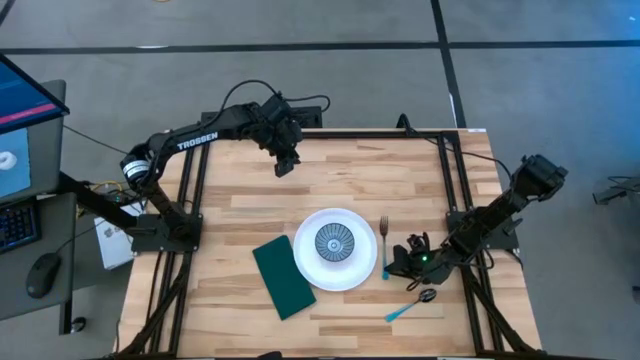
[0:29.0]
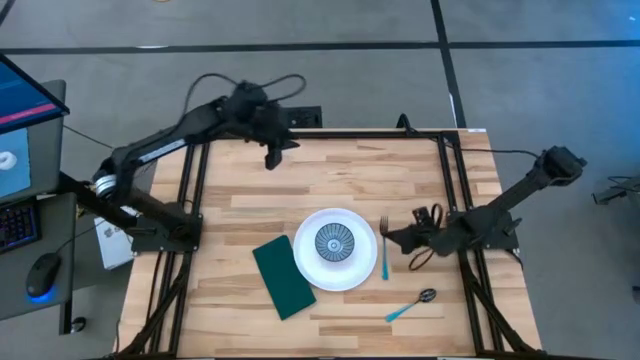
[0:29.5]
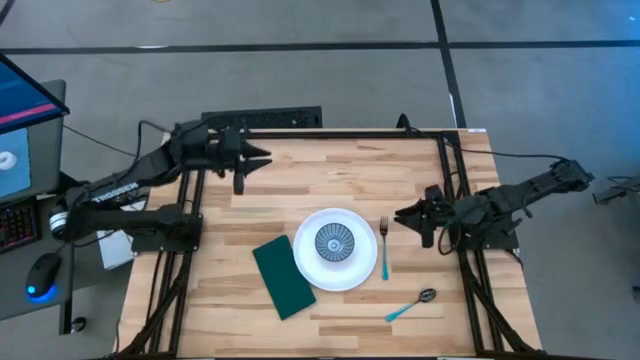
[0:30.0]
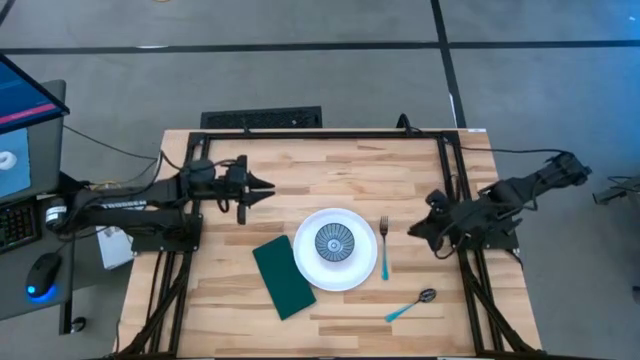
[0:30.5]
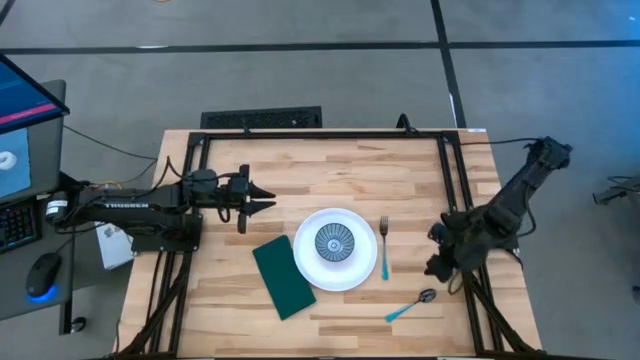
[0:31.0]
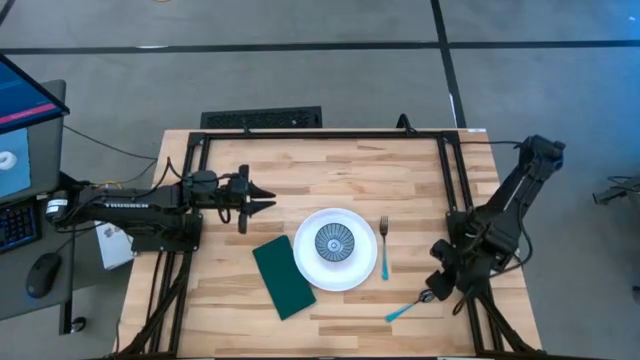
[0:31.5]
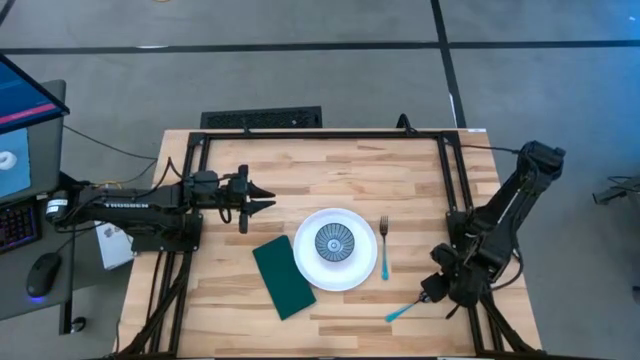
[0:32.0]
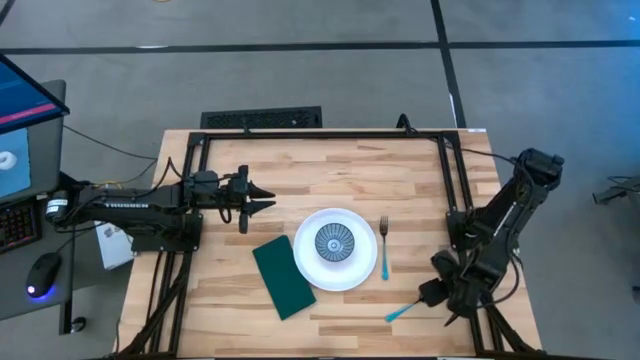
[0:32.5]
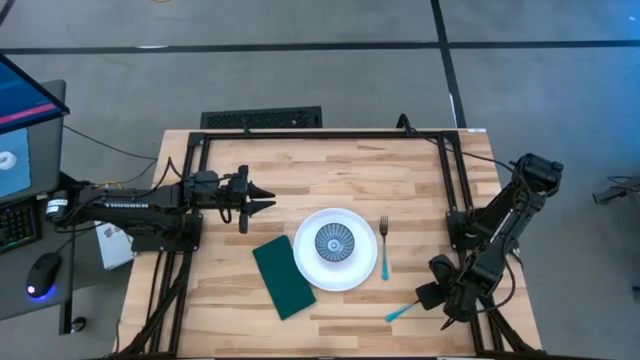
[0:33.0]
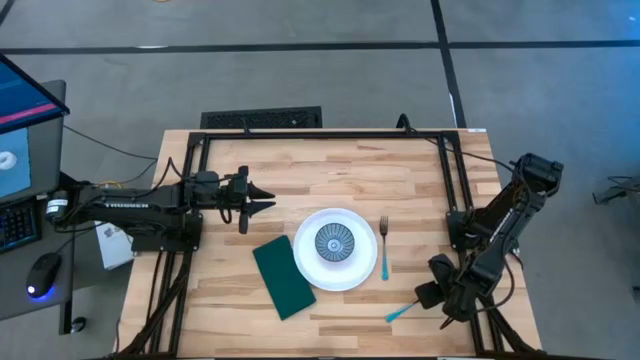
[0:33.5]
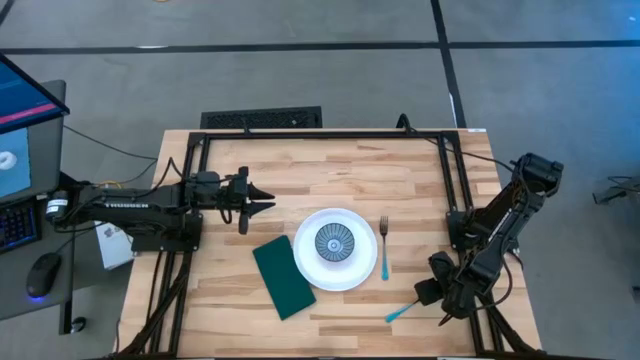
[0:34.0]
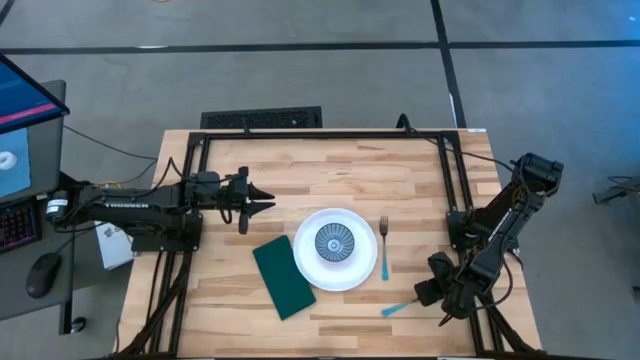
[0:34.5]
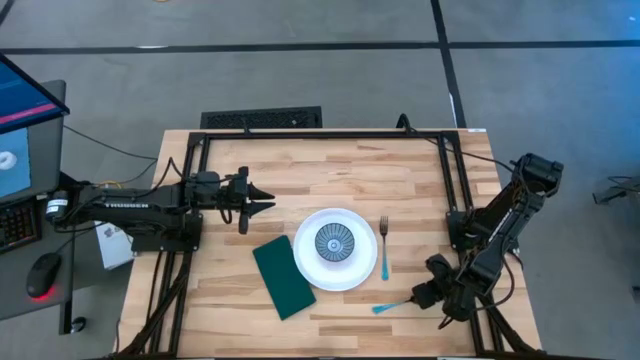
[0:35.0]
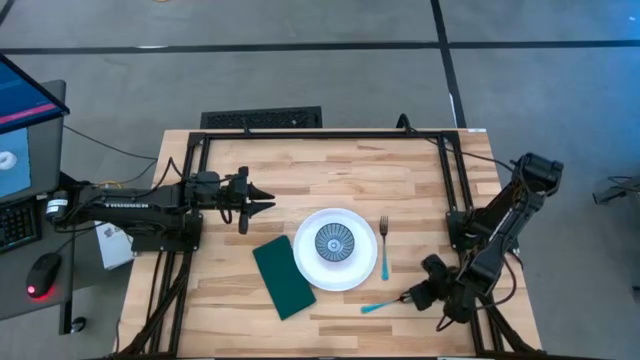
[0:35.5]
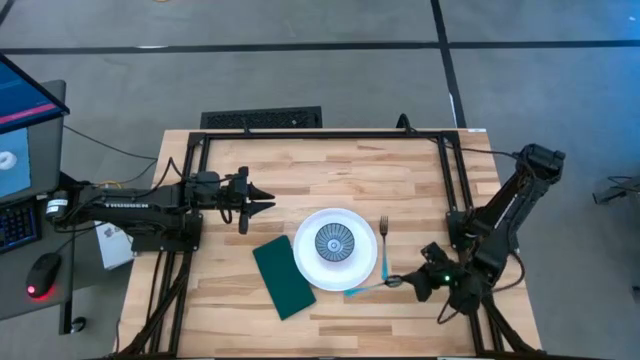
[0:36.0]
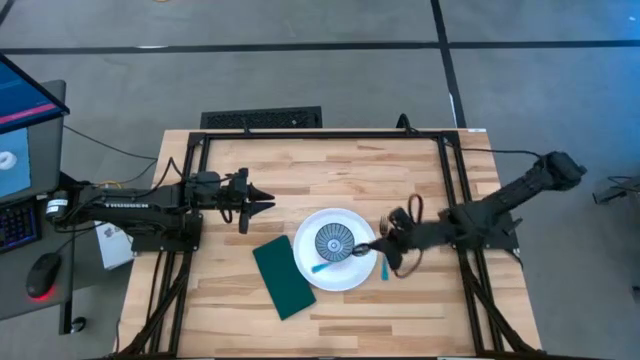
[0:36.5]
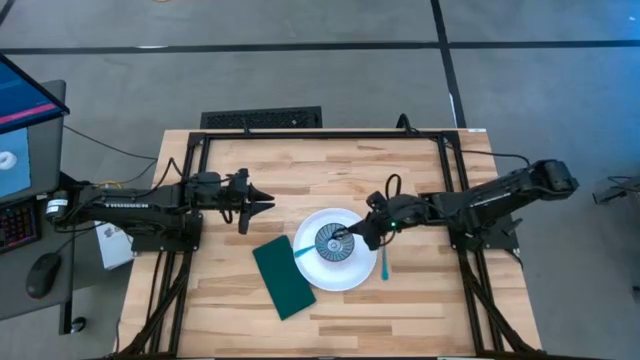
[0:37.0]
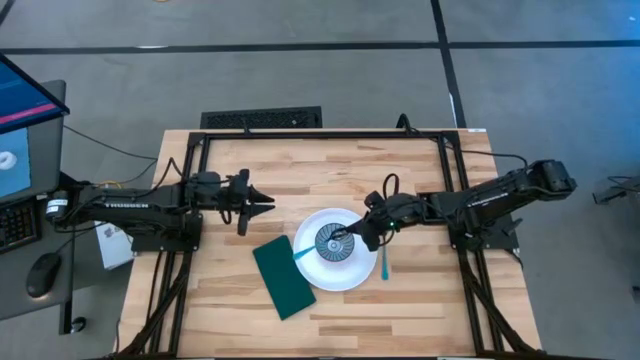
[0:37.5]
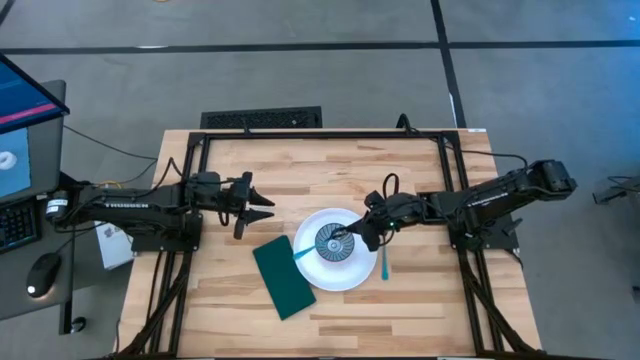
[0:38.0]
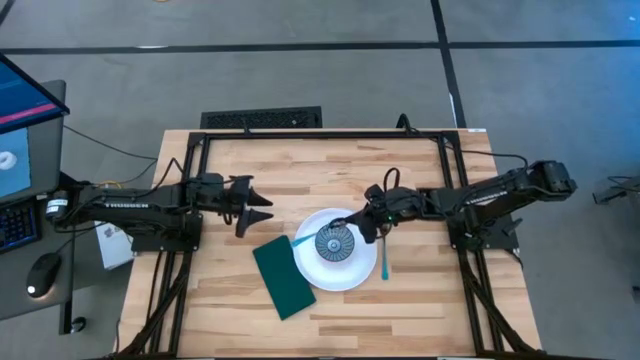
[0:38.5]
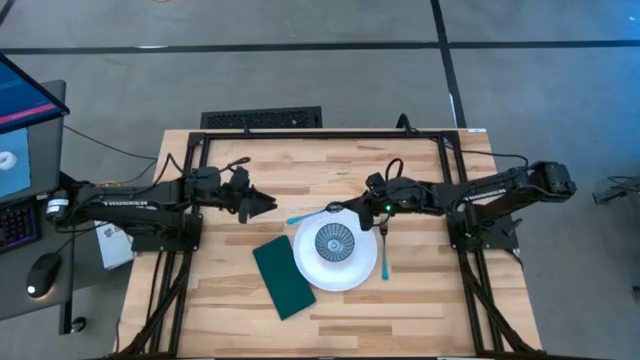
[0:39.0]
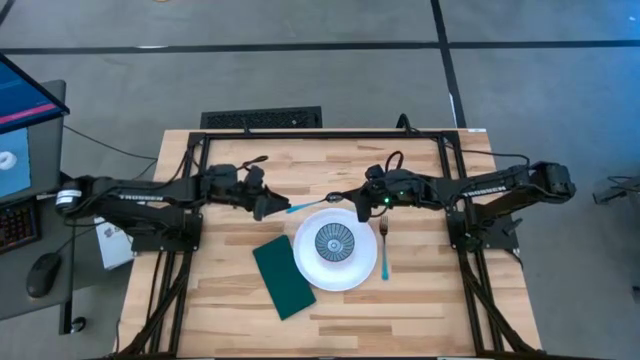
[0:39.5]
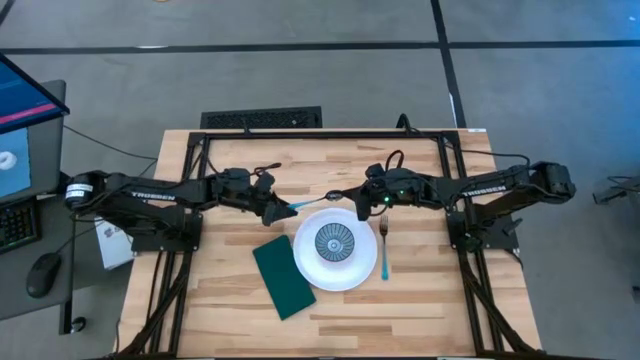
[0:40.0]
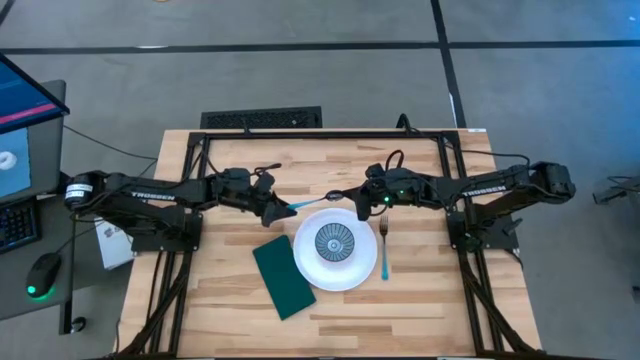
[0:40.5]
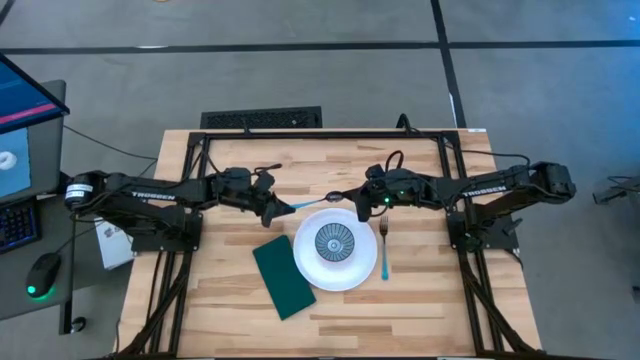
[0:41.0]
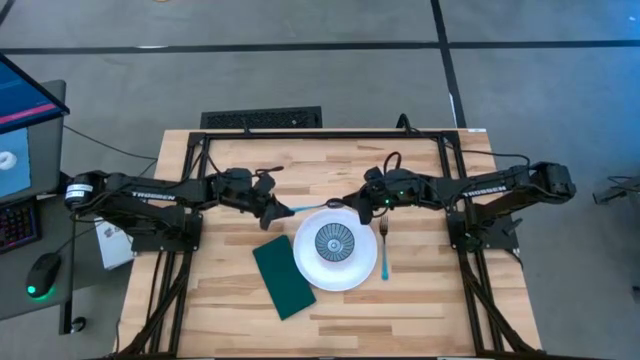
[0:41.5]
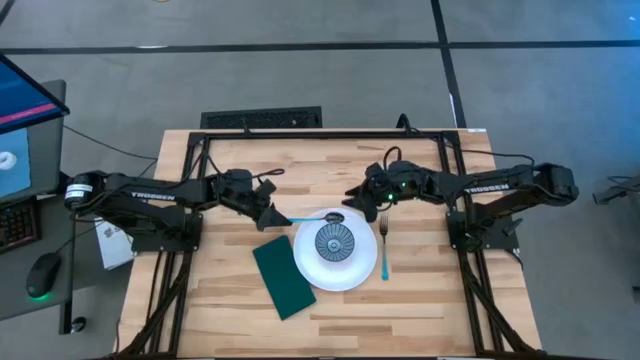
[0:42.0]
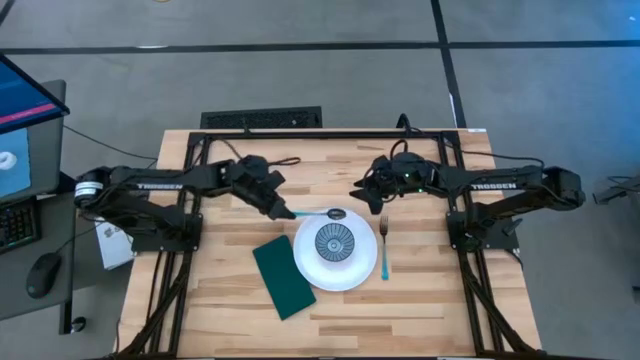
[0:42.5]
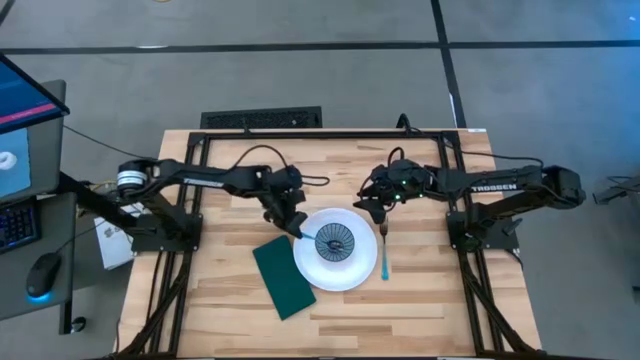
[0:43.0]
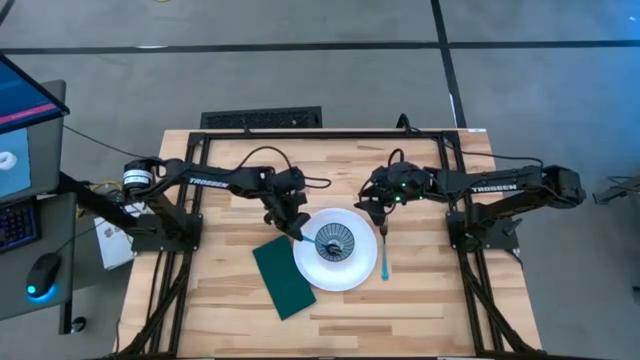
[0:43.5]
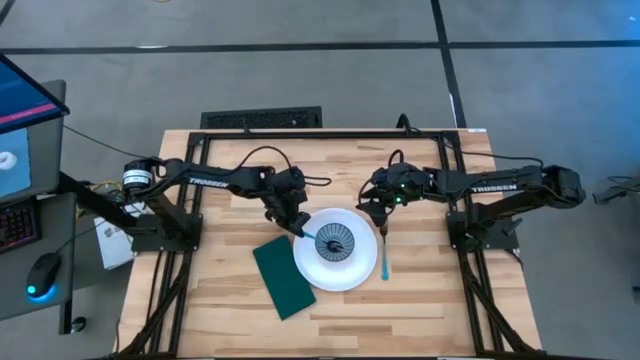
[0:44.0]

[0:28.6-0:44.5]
Task: Set table place
Put the blue spoon into the blue patterned bowl on the white plate

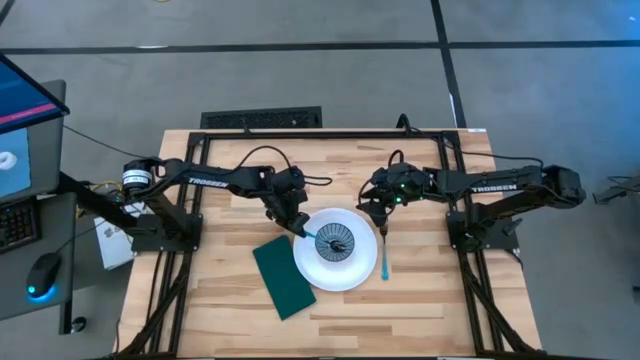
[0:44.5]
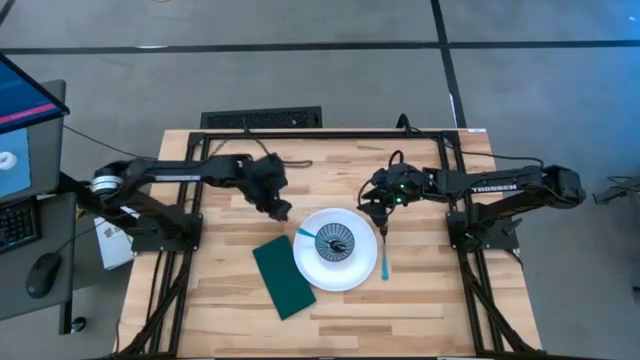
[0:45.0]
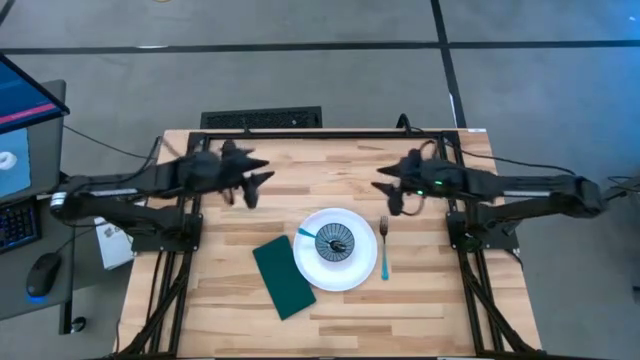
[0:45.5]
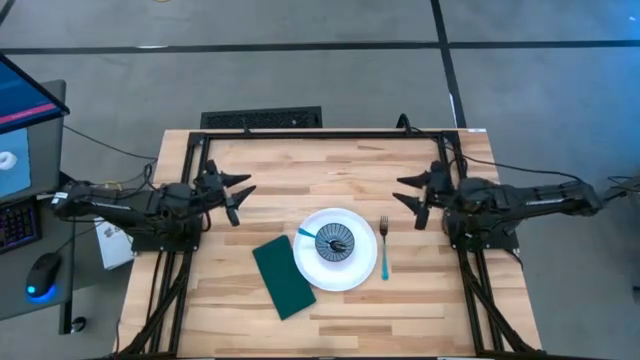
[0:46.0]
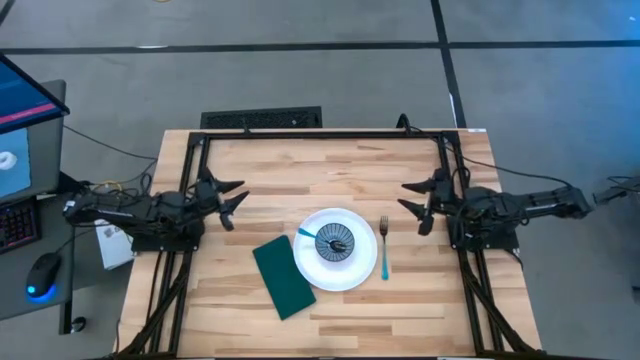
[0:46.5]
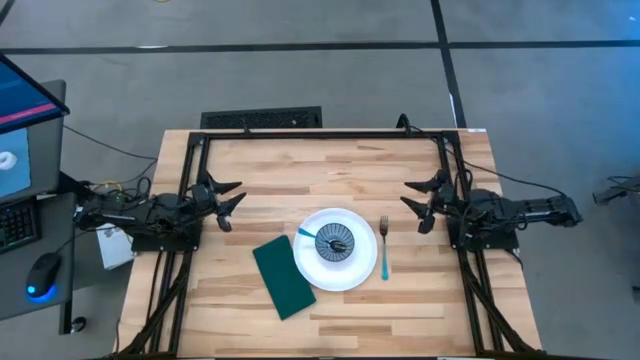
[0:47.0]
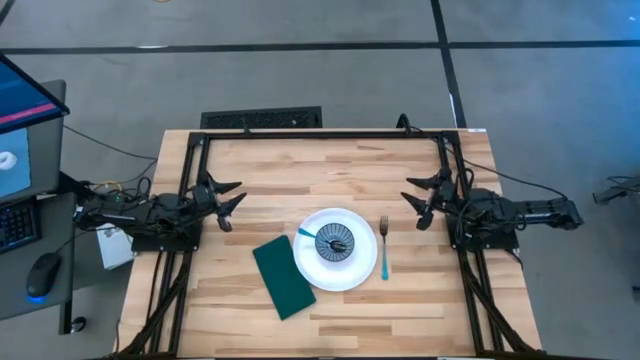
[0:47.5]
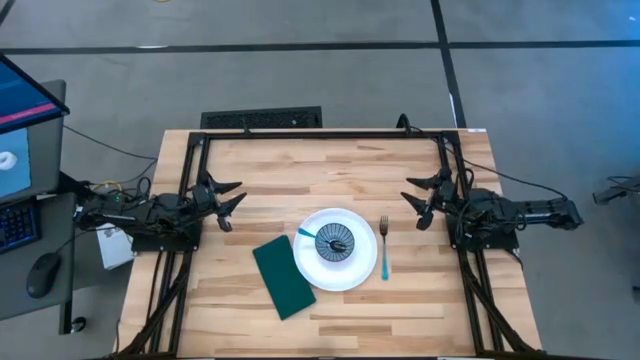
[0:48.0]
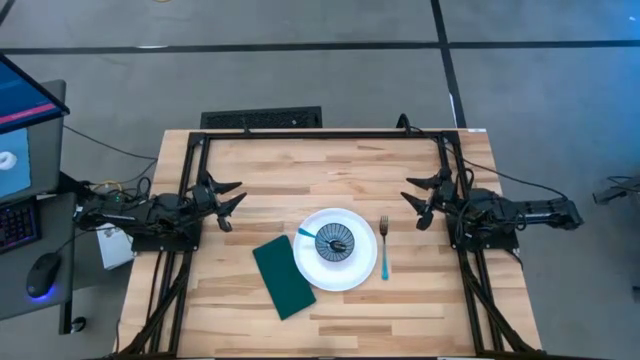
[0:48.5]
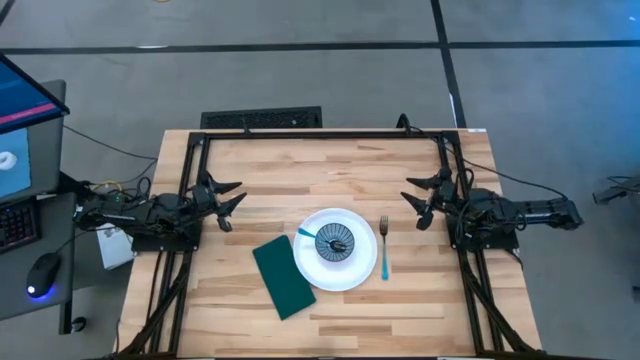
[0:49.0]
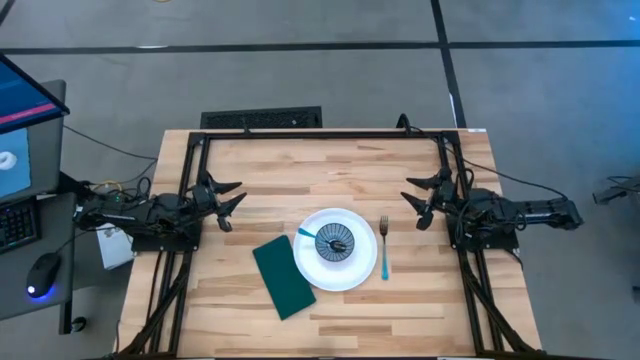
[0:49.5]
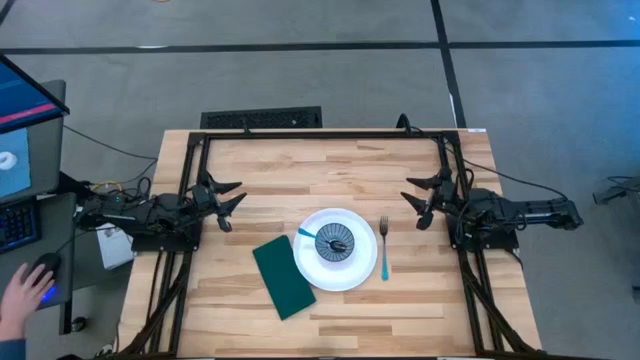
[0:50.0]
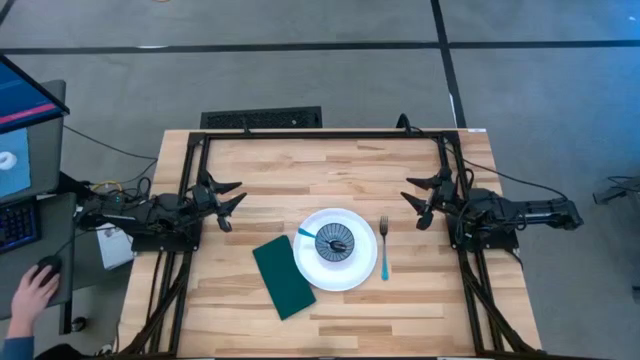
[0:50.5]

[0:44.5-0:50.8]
Return to Home Position
